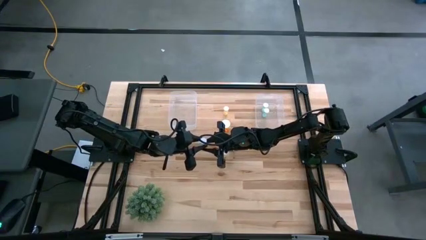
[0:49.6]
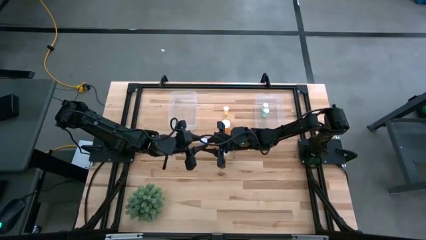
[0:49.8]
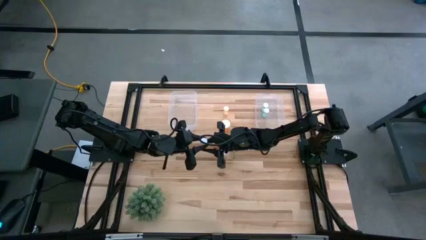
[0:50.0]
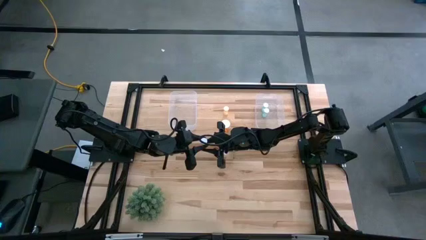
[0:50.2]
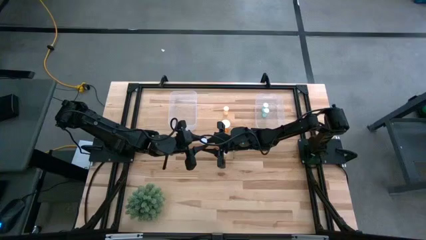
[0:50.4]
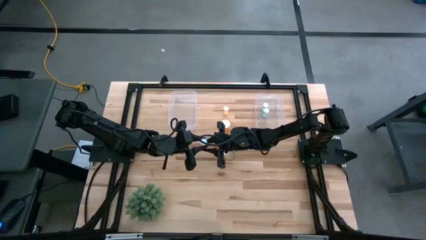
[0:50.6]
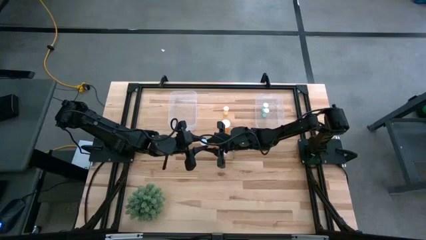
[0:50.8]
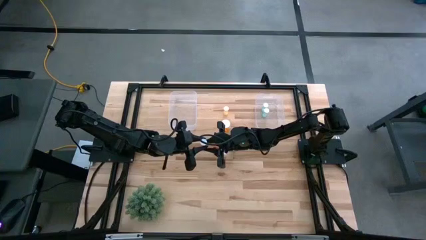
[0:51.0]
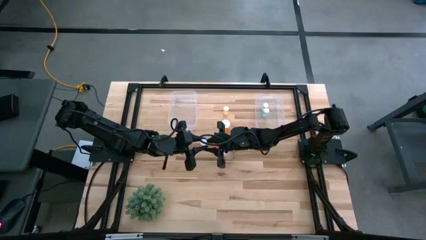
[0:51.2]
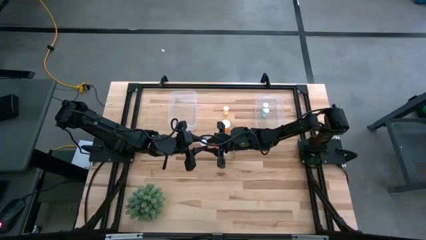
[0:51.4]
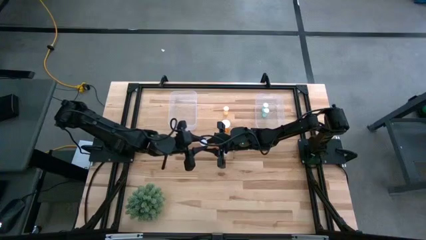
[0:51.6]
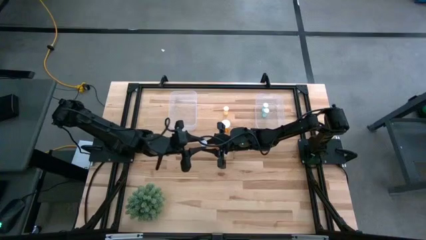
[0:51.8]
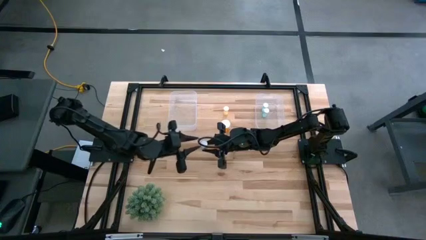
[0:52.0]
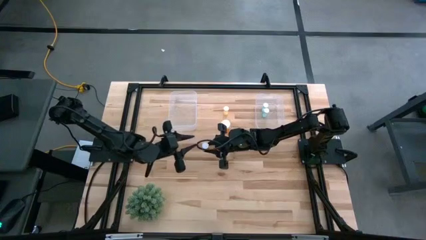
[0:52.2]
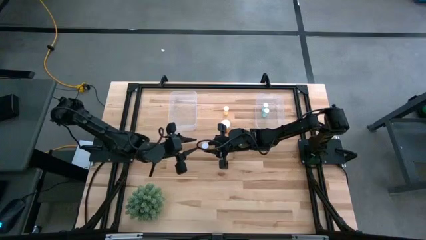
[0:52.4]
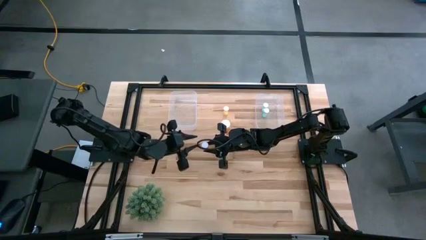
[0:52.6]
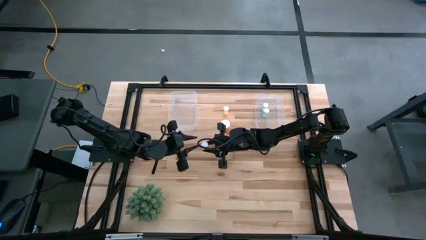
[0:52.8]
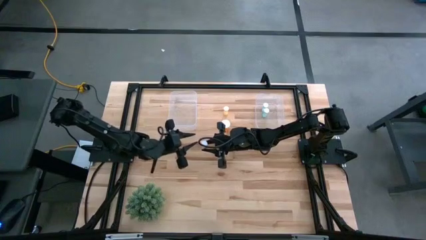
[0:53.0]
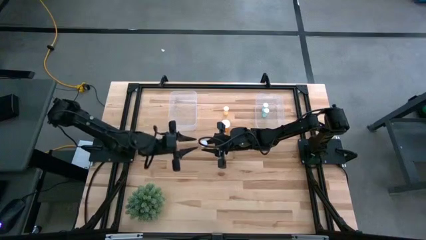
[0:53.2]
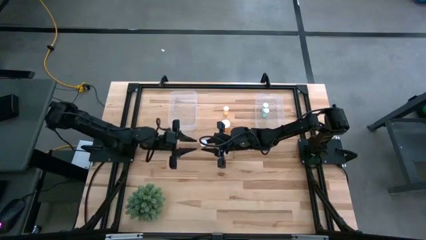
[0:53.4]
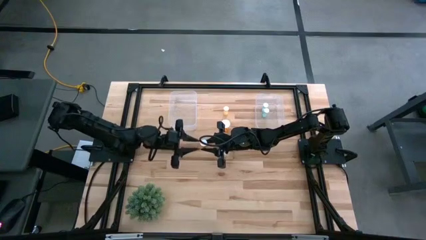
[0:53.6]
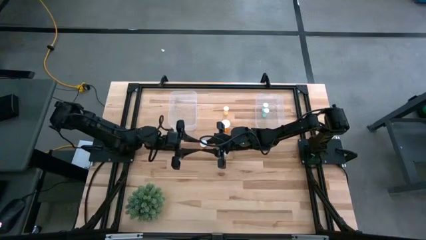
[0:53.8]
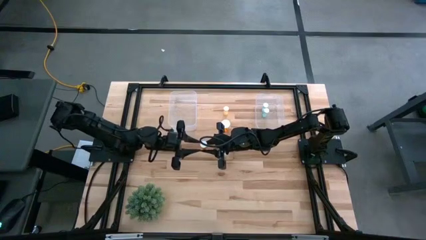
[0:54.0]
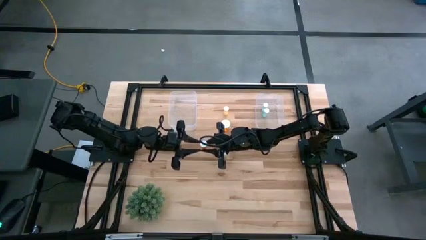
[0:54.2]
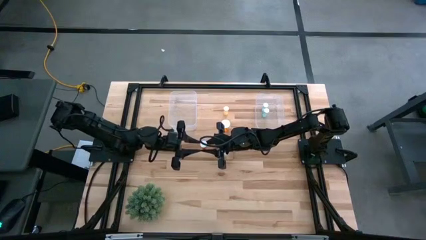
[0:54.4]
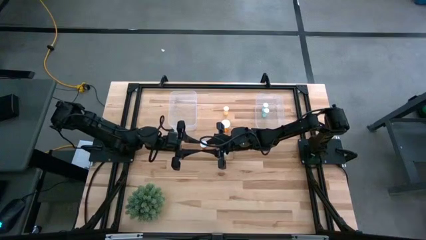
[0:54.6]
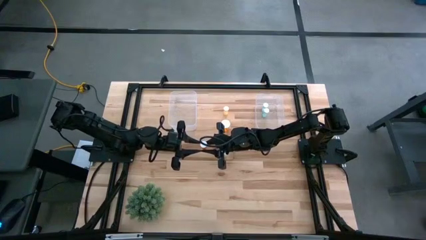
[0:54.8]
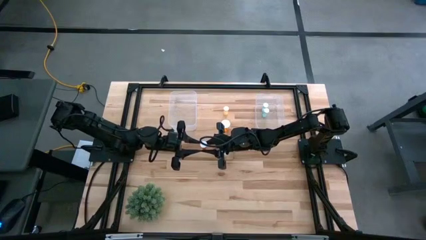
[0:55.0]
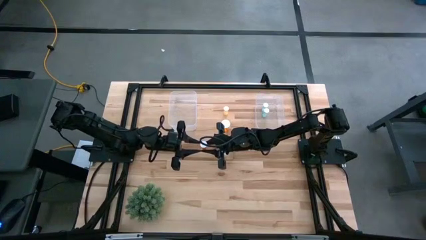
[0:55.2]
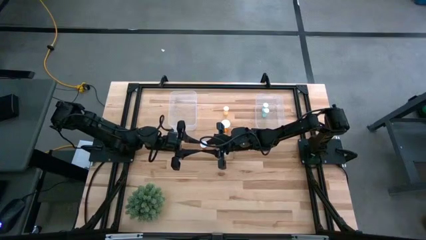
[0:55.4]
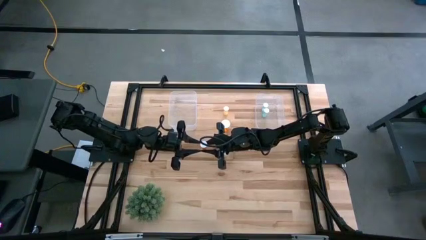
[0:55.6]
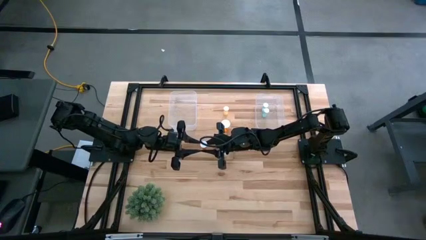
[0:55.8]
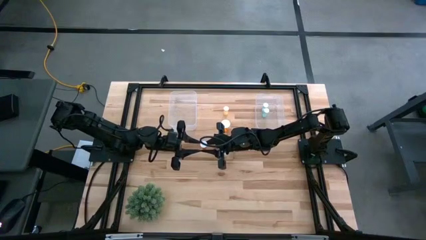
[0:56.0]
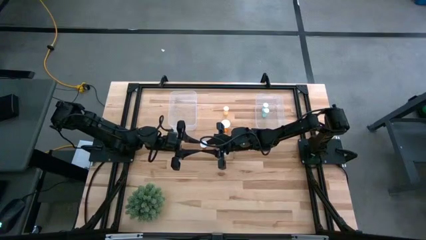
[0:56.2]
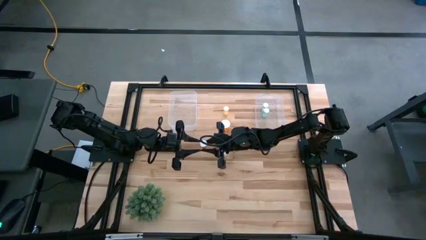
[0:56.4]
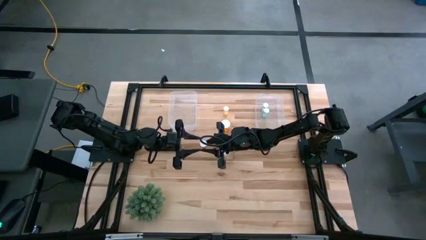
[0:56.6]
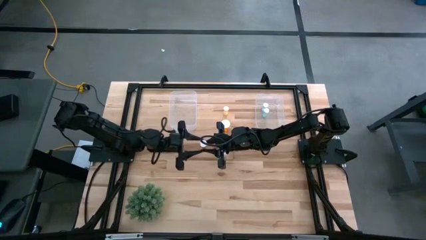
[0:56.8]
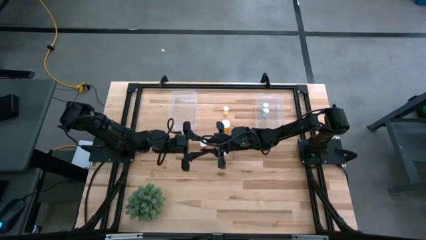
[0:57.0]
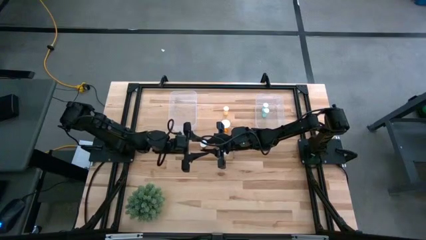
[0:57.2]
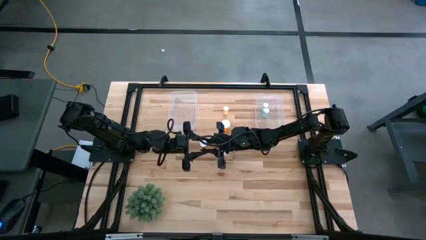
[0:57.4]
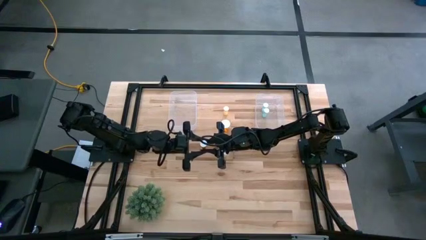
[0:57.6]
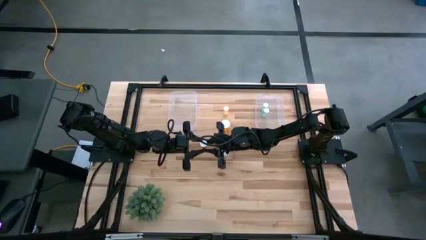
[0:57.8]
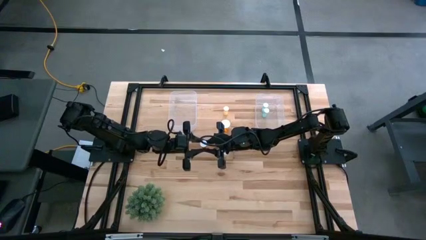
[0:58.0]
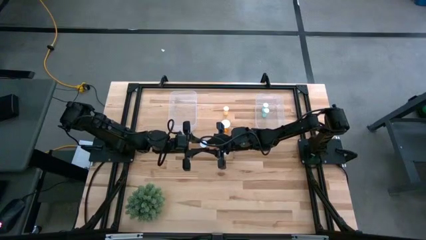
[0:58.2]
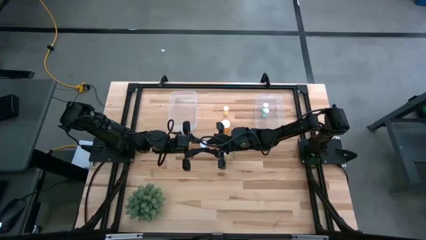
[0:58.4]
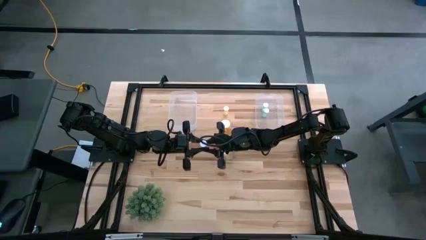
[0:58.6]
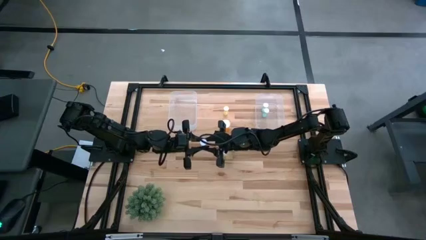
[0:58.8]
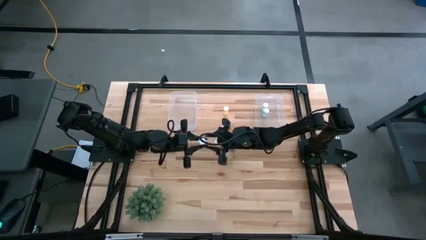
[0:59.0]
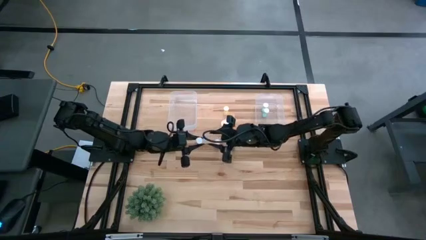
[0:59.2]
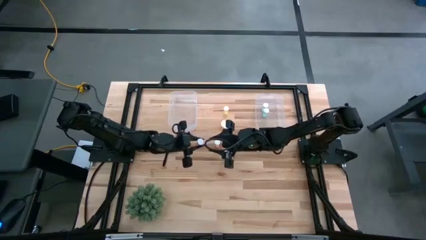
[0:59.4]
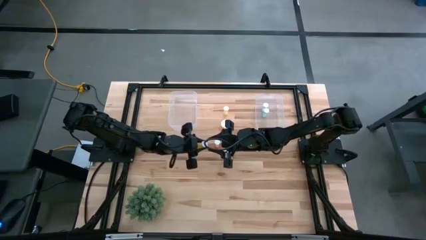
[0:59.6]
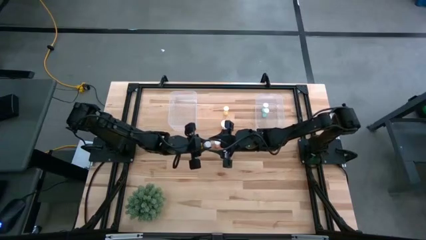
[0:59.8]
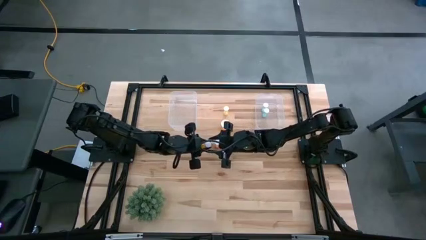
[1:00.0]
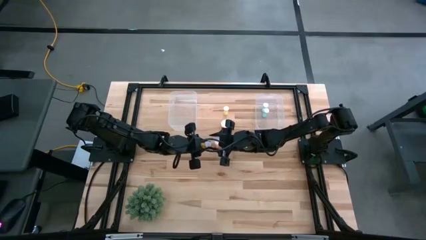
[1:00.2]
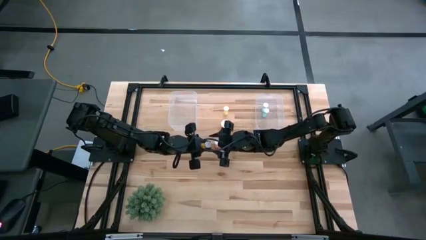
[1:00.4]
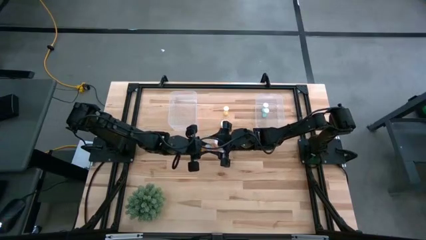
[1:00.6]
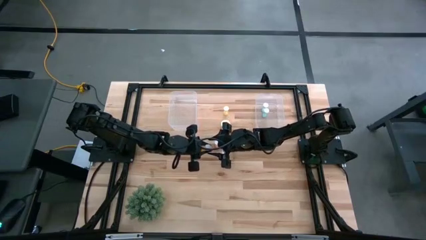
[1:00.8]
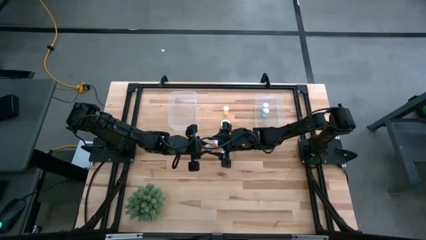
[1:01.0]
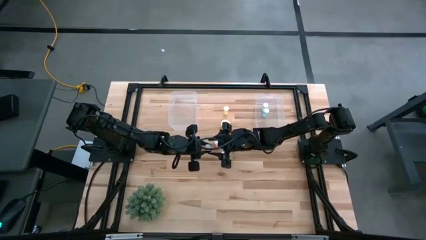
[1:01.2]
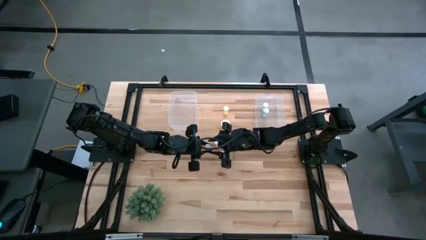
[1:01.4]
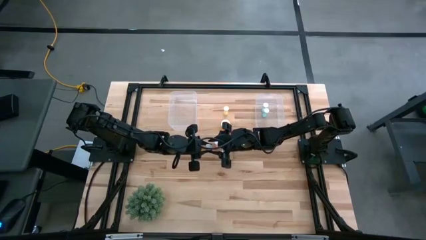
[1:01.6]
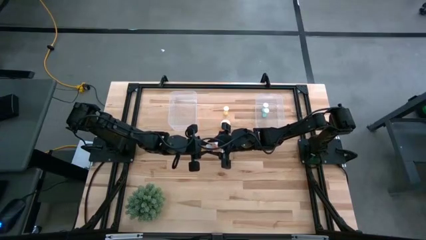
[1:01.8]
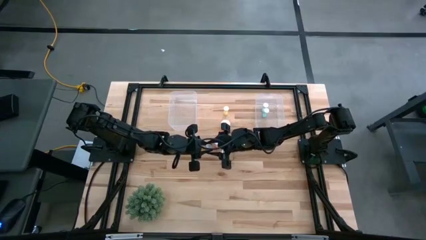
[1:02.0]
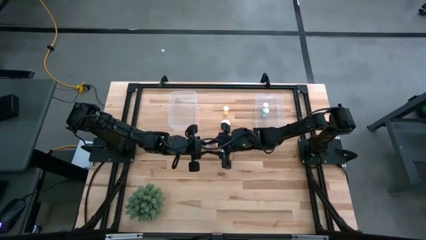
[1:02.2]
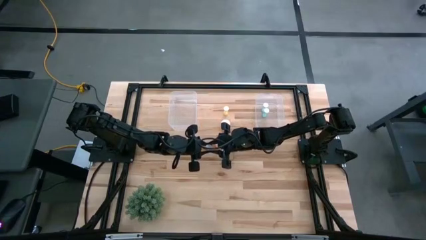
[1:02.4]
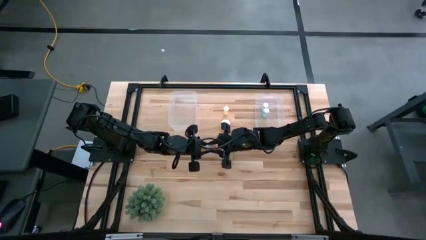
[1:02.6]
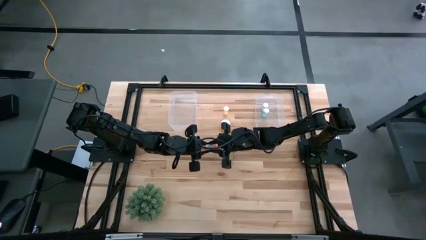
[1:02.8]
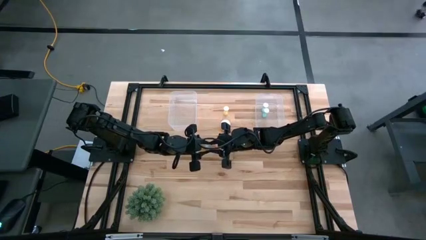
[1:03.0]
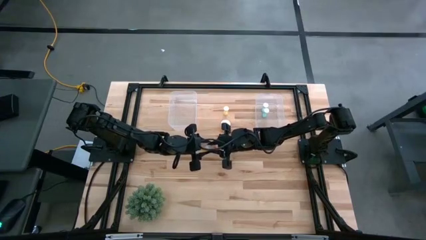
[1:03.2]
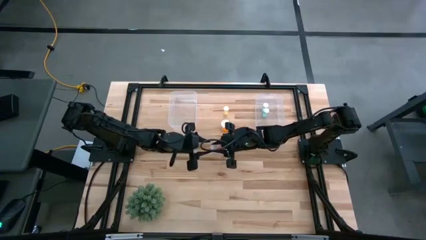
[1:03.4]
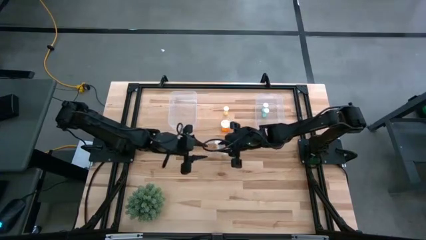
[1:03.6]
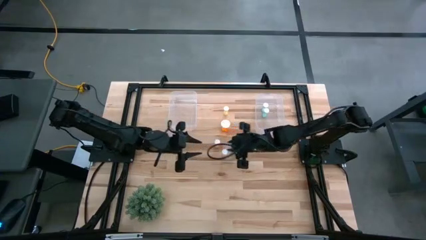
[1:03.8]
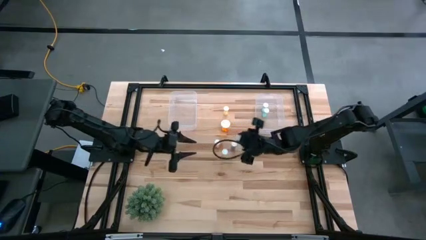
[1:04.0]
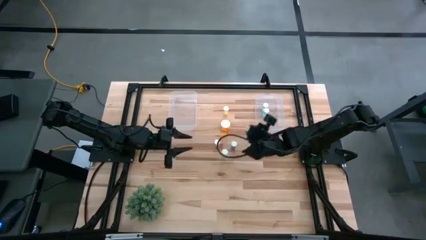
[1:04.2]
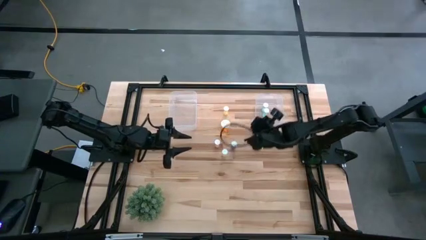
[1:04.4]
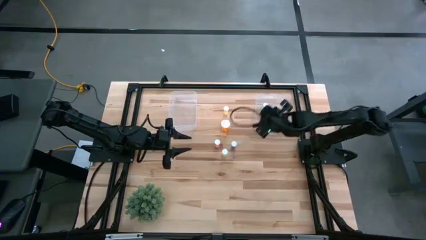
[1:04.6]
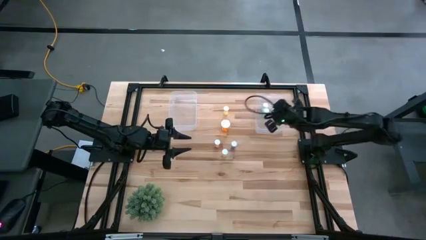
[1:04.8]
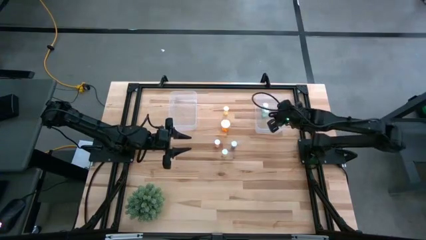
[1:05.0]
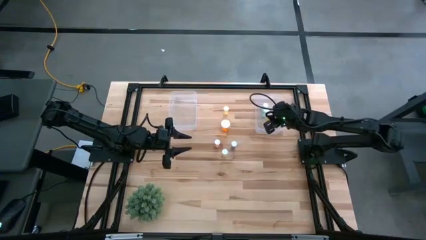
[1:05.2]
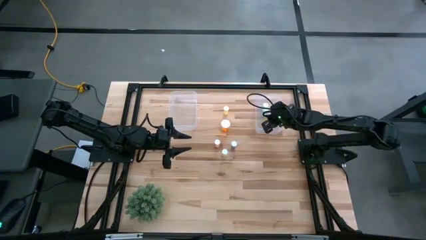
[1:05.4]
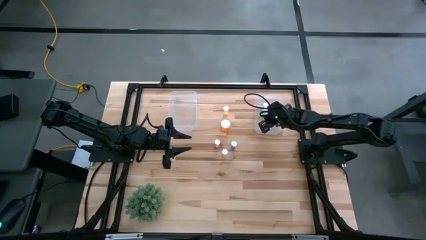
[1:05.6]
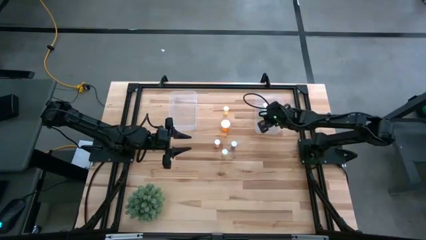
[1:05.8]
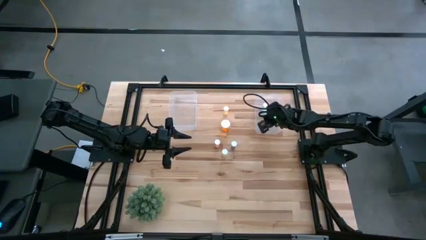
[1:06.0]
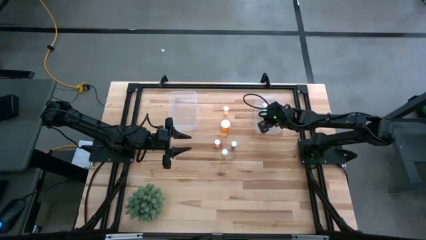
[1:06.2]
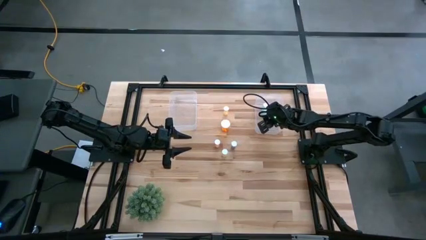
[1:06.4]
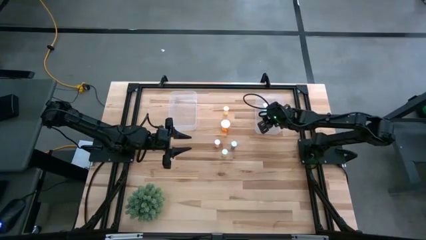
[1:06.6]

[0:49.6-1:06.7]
Task: Pick and place medicine bottles into bin by pill shape (circle, oval)
Put the small orange tablet bottle into the right transparent bin
